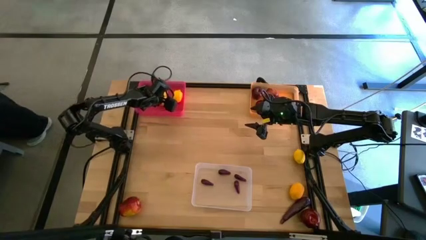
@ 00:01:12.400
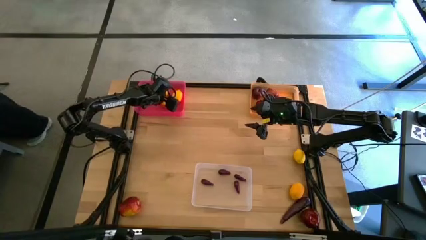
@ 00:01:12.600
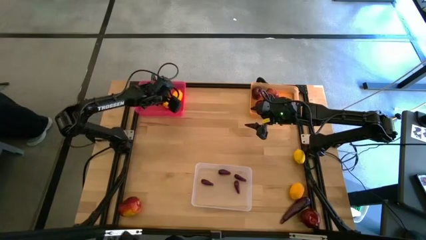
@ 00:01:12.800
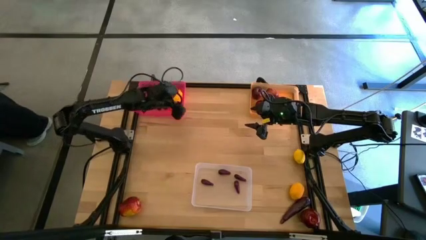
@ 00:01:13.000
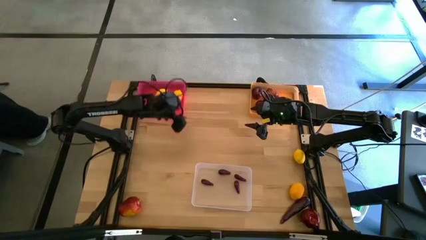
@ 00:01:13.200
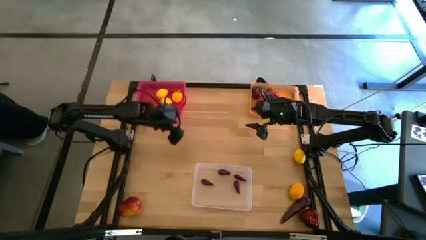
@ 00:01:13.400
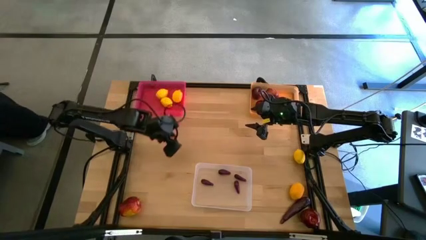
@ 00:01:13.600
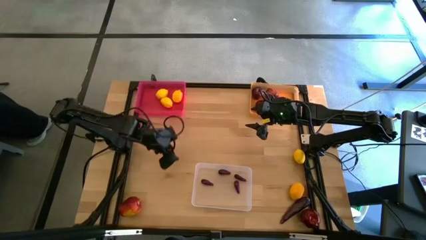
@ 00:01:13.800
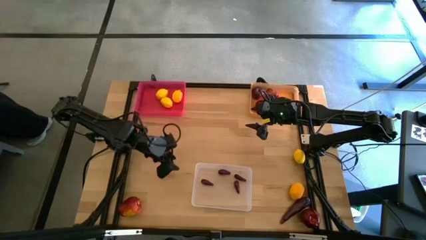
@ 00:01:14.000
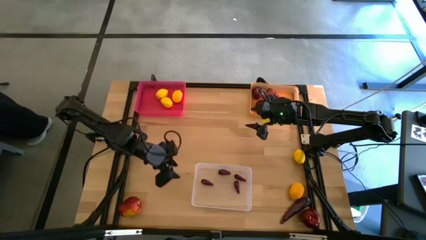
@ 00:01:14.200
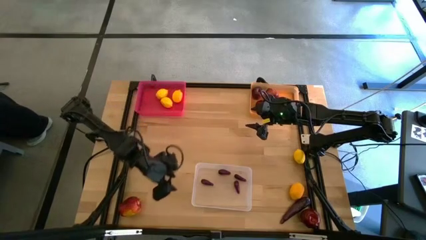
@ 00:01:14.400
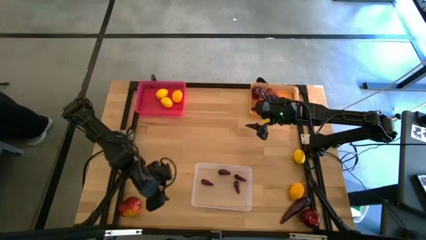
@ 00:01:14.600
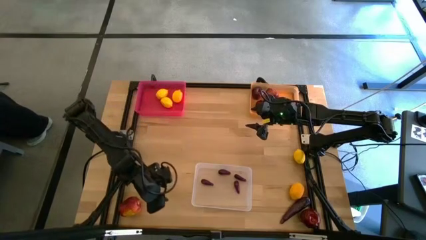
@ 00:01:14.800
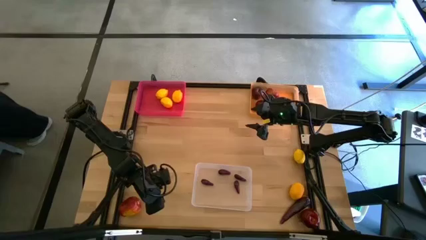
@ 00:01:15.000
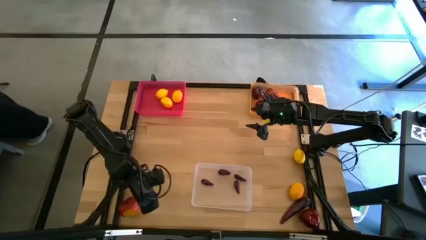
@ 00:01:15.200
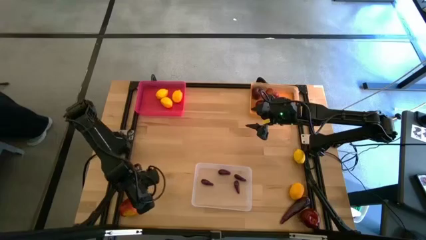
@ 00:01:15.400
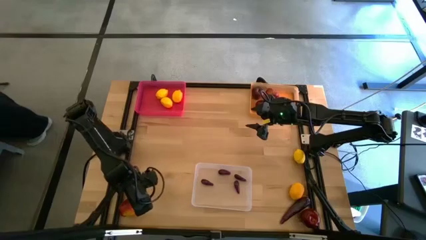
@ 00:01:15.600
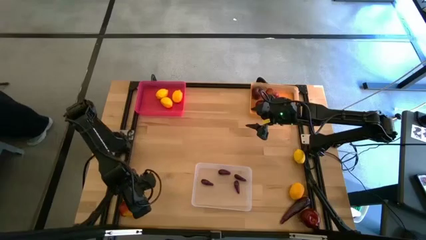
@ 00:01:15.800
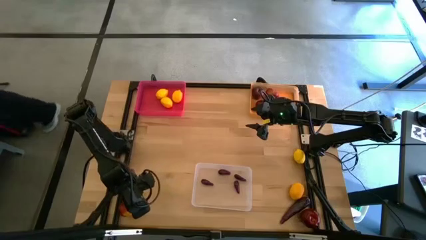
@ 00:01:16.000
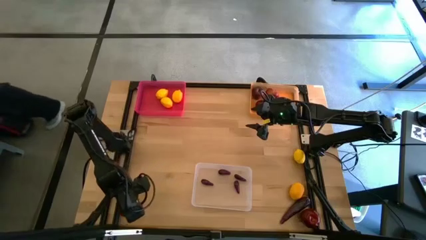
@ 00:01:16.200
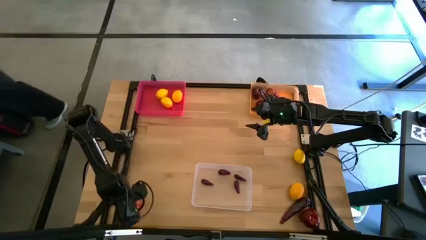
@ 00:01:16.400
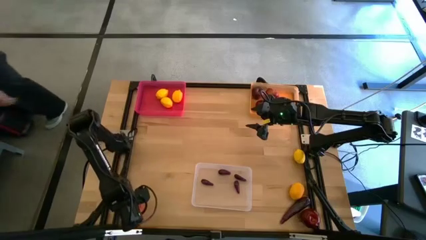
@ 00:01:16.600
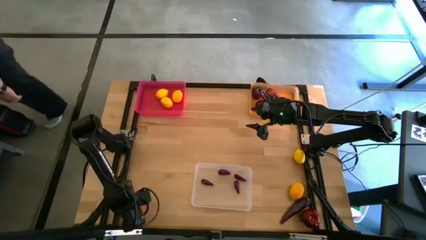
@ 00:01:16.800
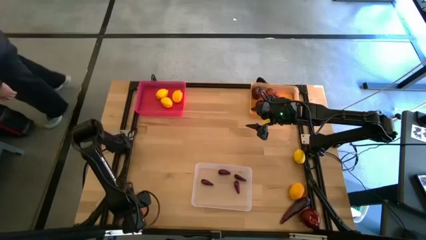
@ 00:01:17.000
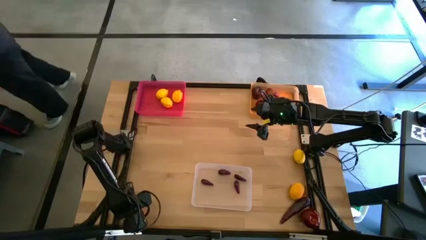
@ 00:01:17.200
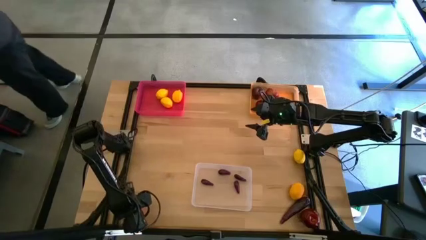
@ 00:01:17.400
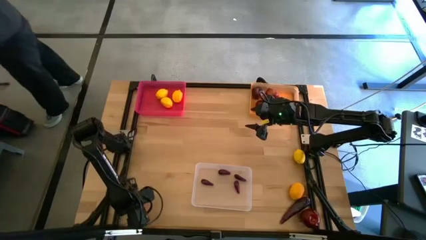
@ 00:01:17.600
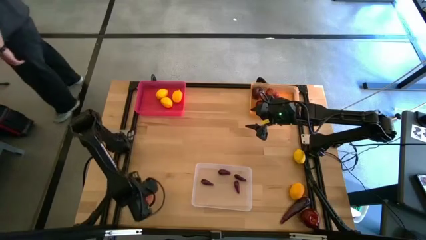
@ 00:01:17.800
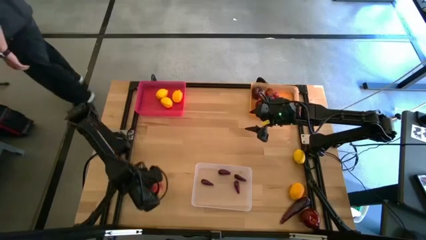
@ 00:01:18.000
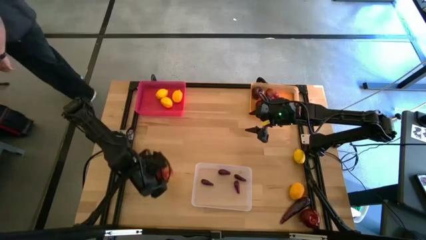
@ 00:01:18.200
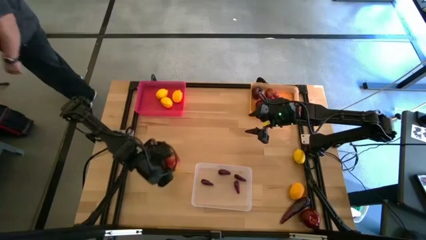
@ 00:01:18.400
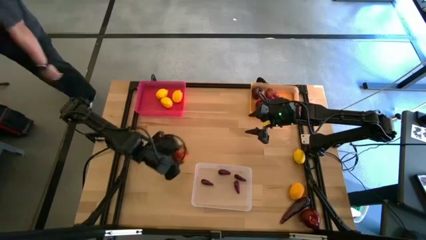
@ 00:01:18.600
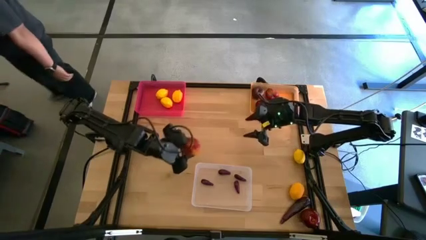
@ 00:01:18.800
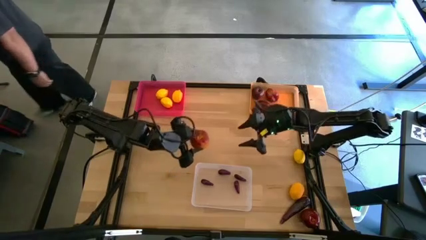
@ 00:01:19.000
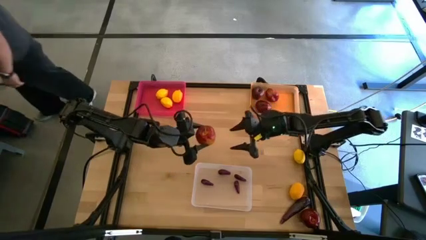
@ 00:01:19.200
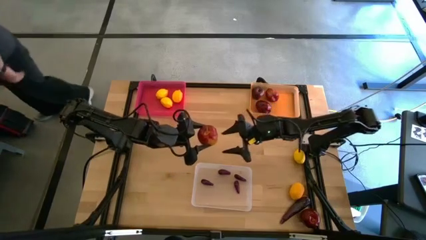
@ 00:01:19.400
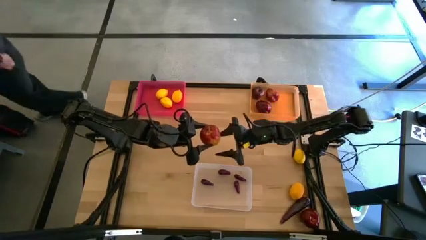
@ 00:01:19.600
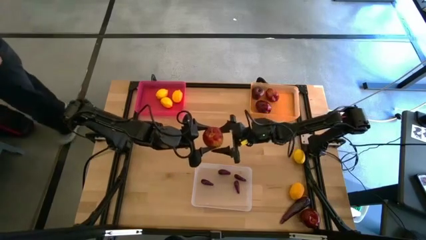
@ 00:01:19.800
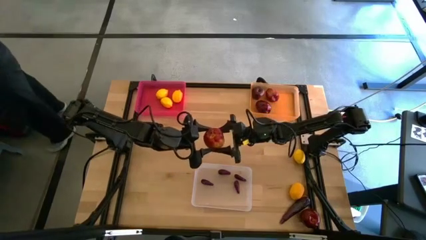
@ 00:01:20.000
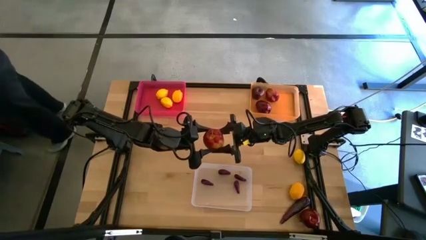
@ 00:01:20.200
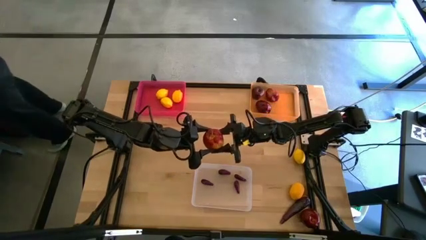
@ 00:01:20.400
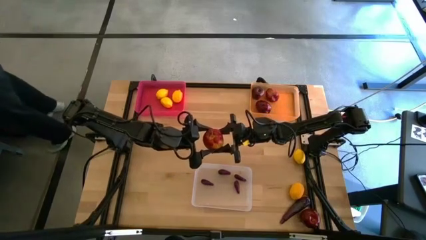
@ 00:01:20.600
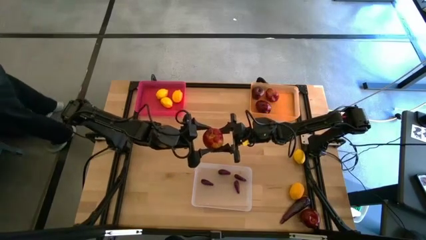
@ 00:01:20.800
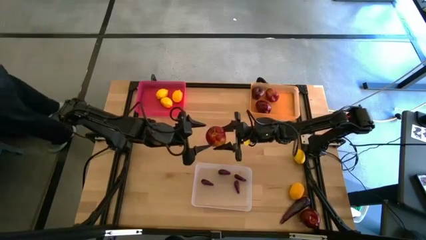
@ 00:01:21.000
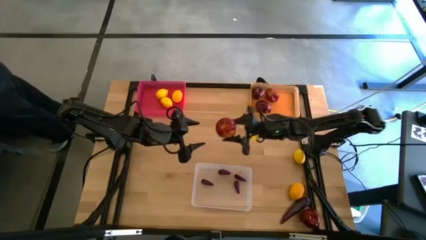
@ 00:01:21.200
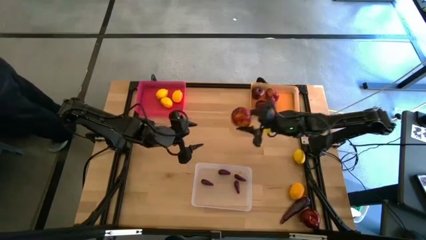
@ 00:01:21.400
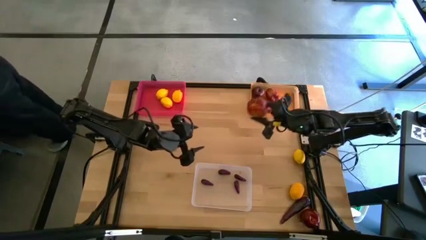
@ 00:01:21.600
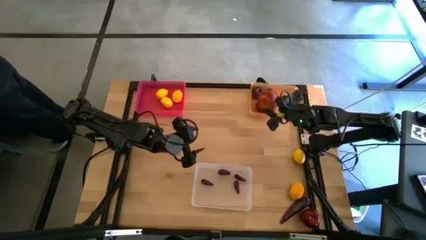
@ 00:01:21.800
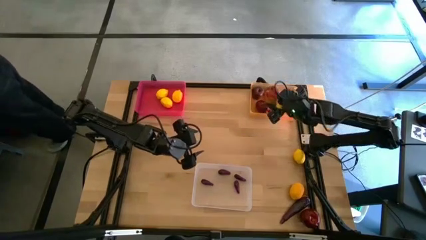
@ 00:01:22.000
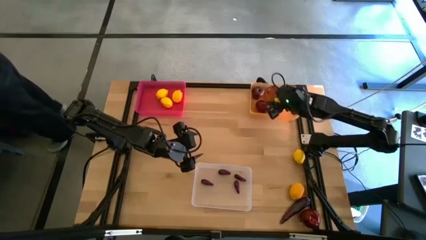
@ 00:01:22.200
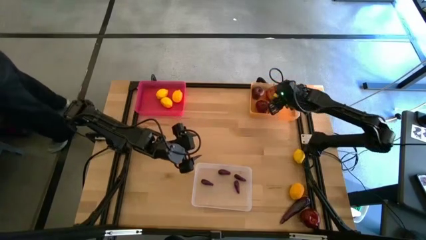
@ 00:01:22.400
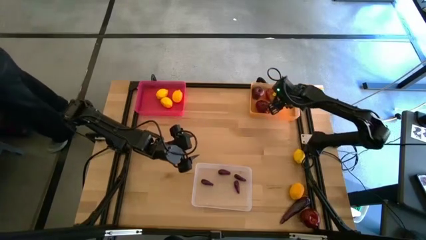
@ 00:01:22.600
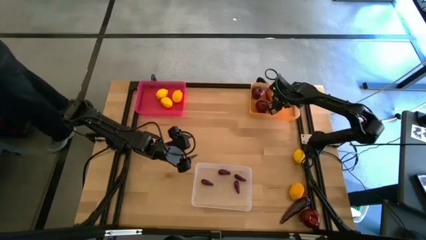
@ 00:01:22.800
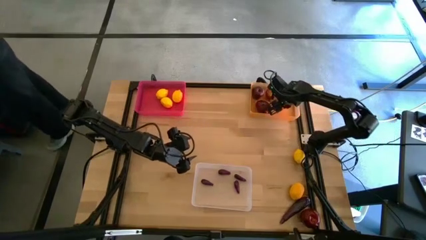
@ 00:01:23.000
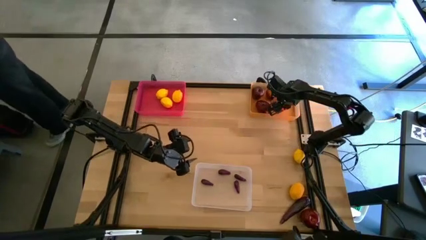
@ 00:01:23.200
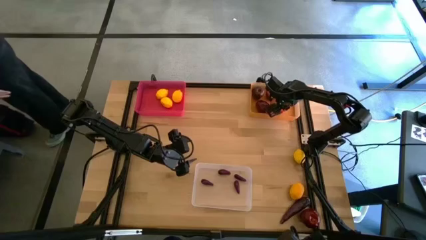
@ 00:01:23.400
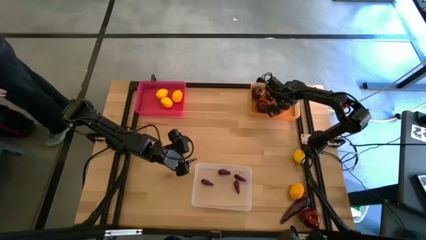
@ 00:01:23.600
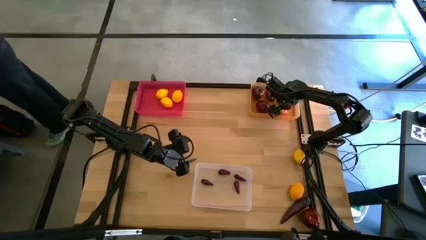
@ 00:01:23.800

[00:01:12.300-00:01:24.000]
Task: Sort produce into baskets
Put the apple into the orange bin
